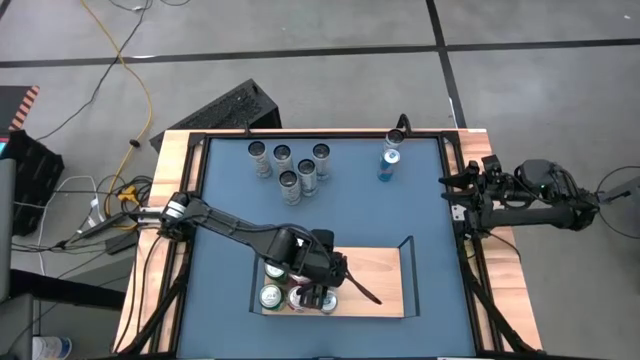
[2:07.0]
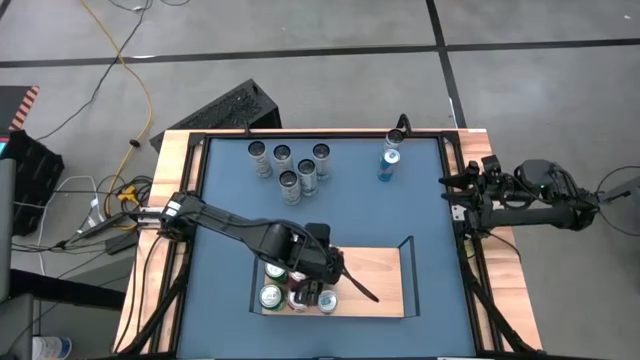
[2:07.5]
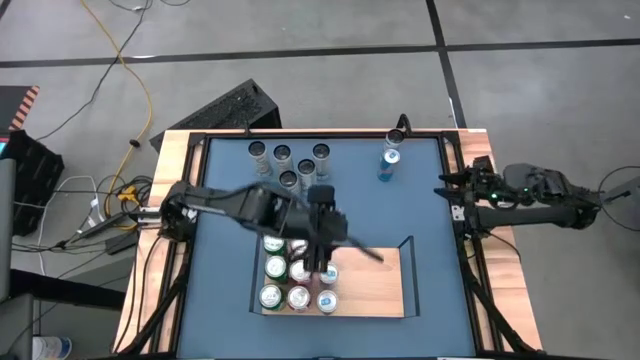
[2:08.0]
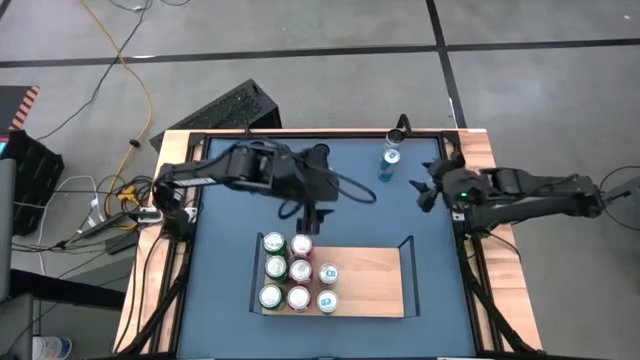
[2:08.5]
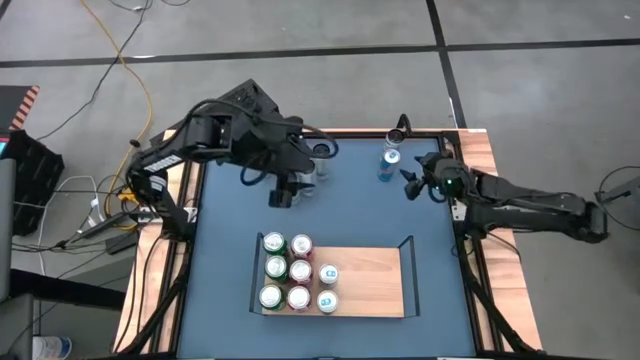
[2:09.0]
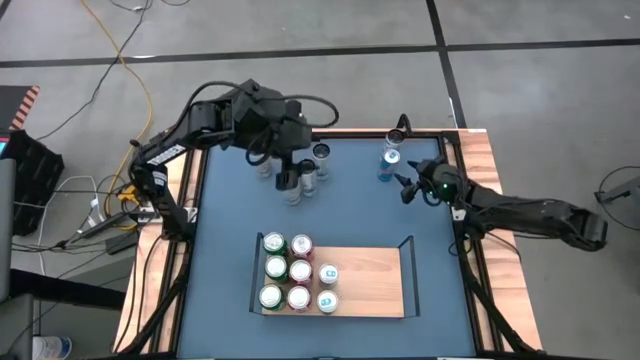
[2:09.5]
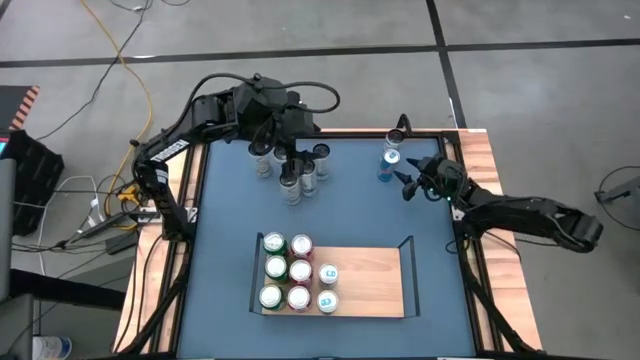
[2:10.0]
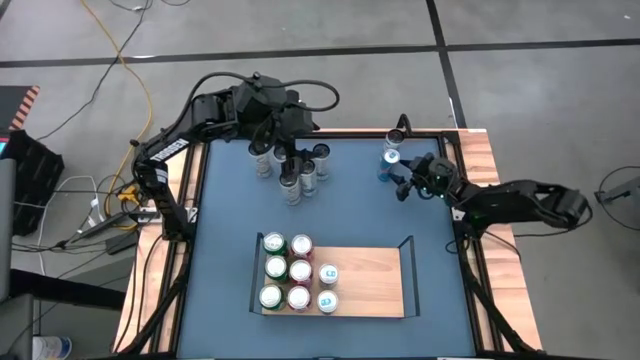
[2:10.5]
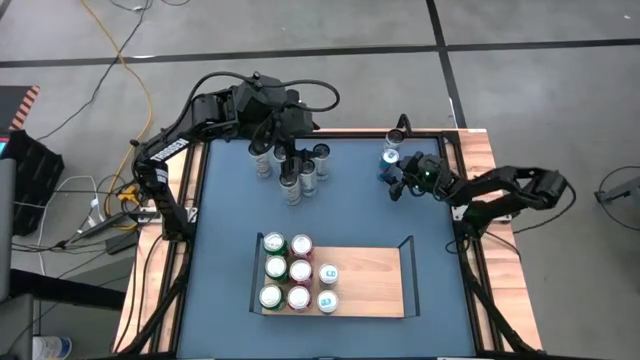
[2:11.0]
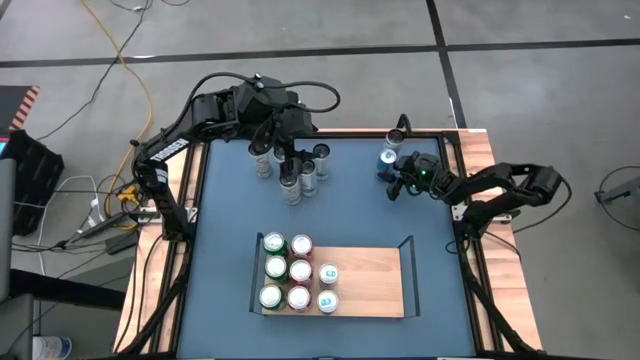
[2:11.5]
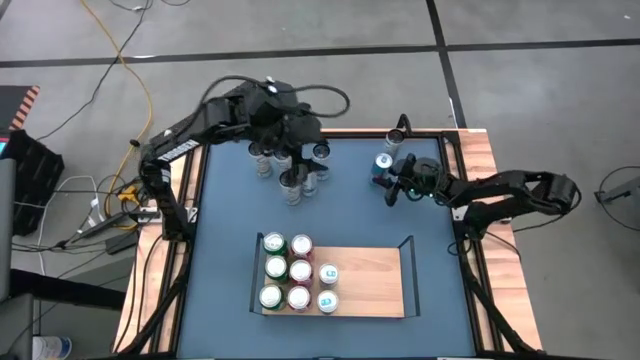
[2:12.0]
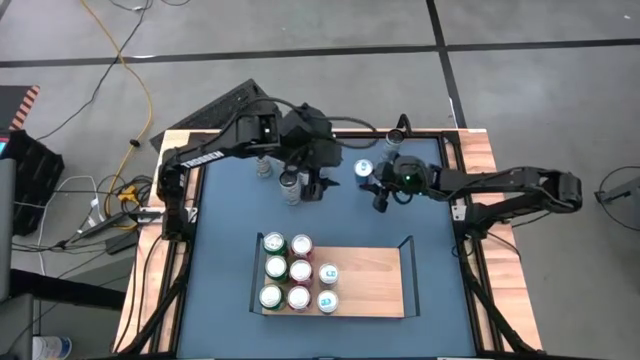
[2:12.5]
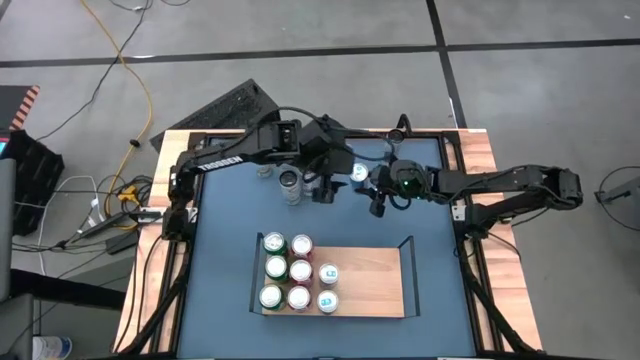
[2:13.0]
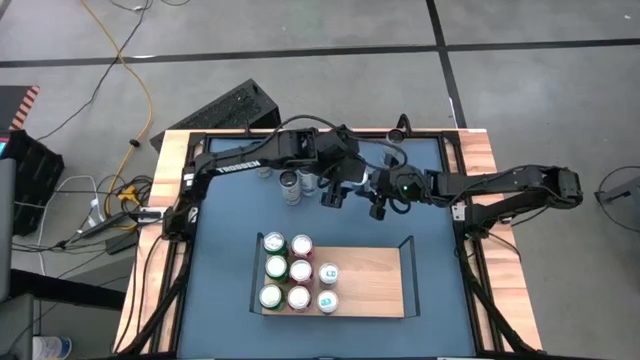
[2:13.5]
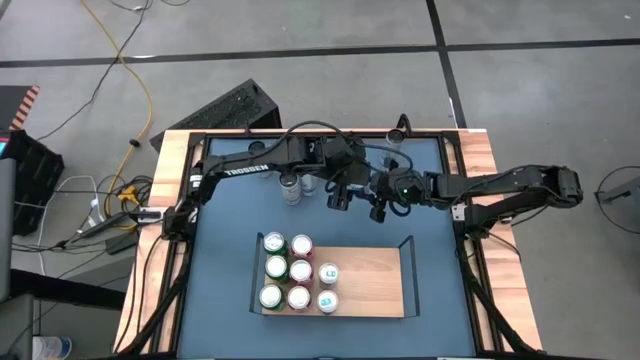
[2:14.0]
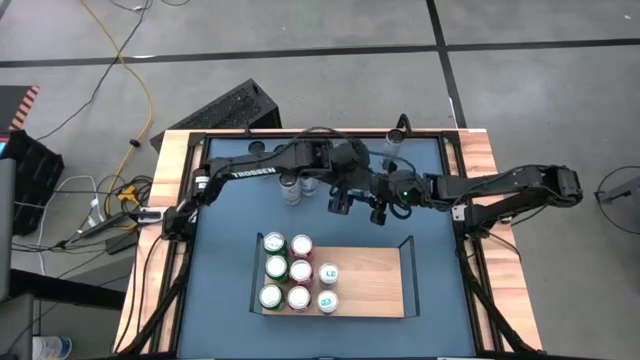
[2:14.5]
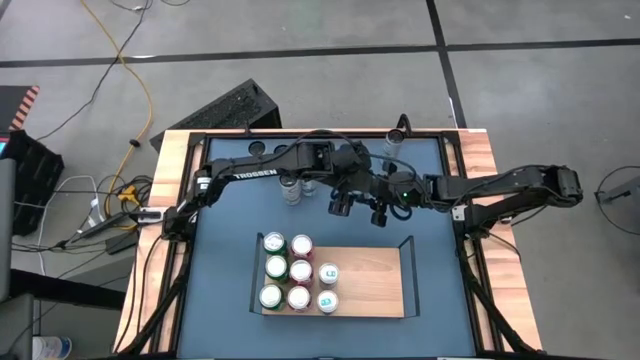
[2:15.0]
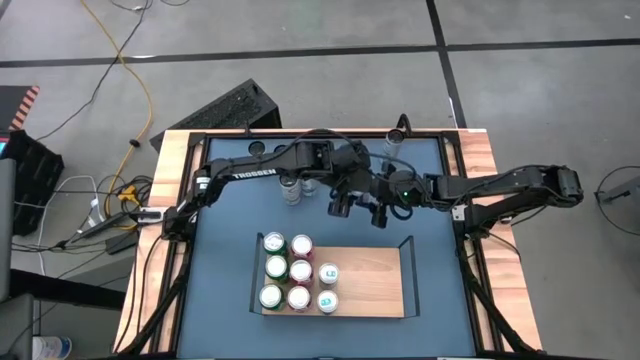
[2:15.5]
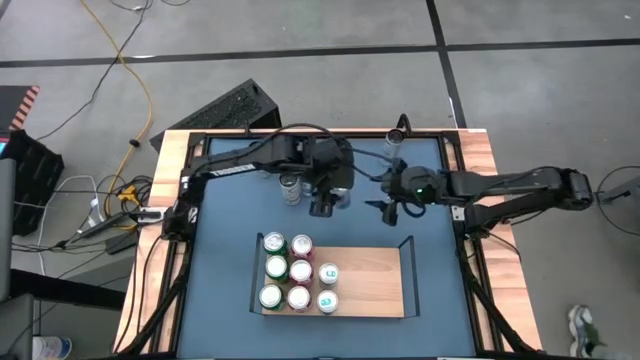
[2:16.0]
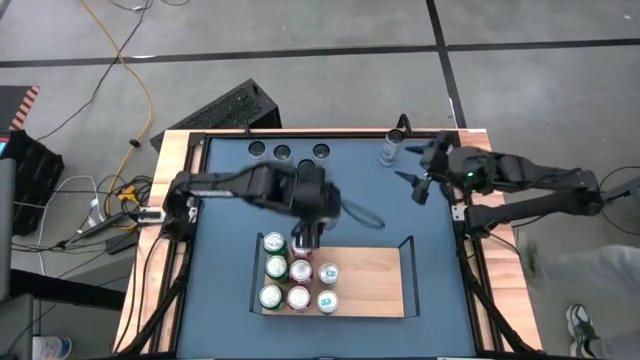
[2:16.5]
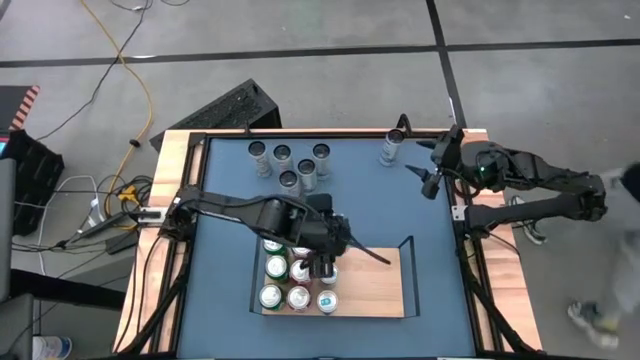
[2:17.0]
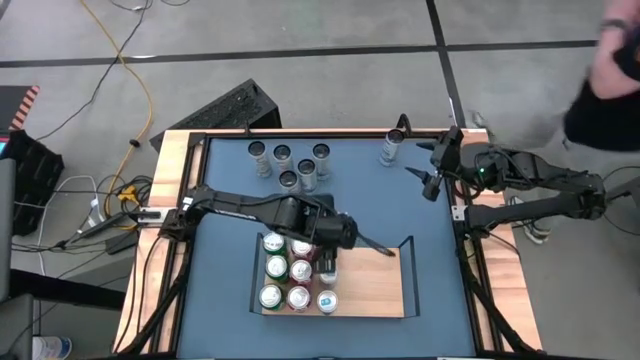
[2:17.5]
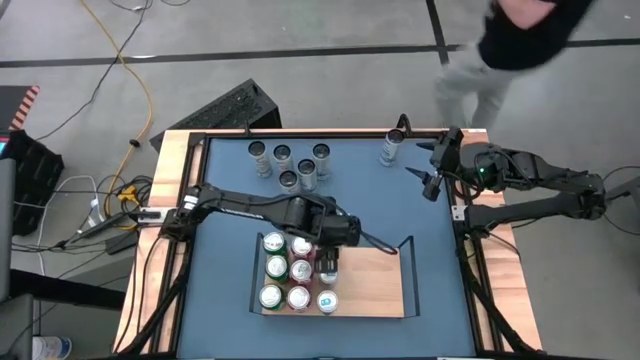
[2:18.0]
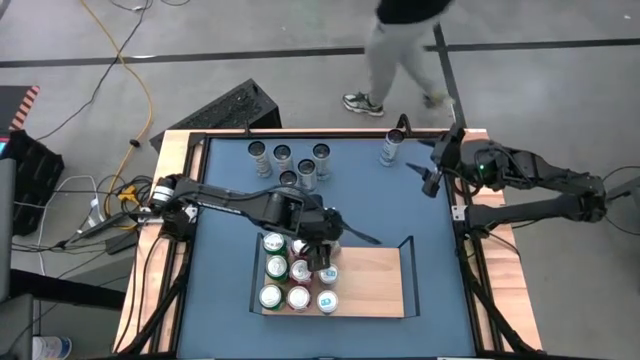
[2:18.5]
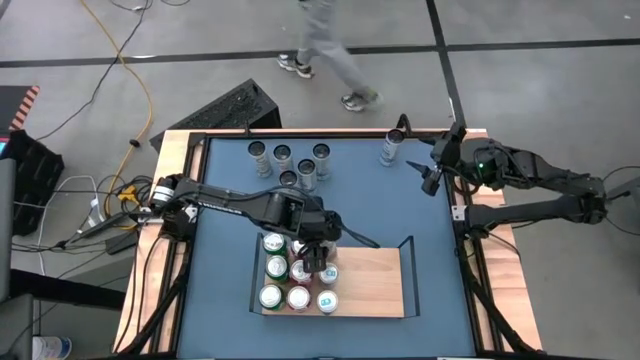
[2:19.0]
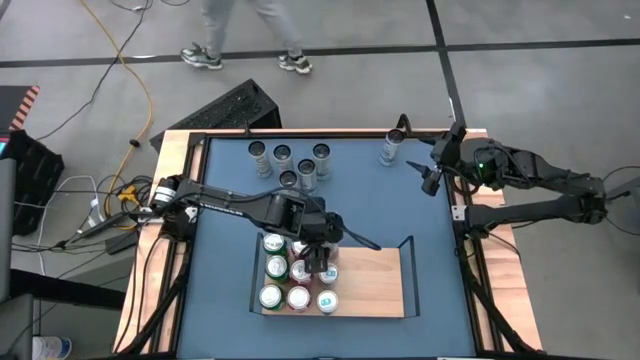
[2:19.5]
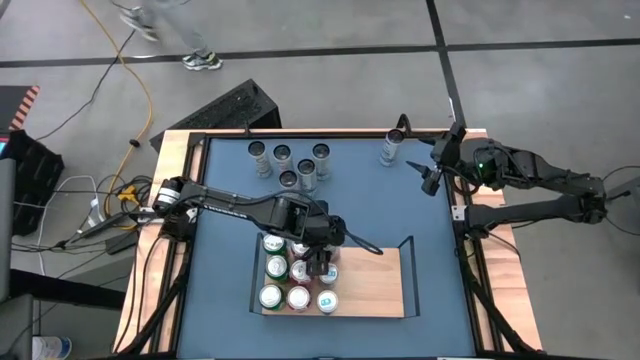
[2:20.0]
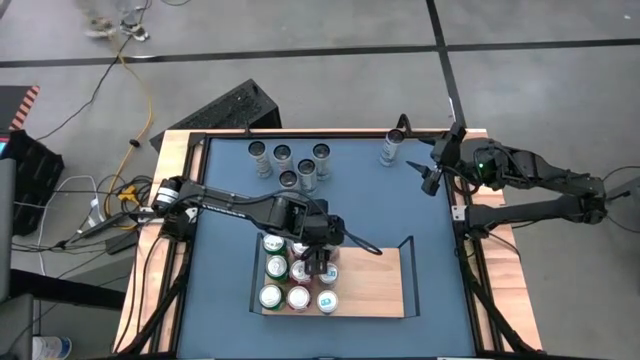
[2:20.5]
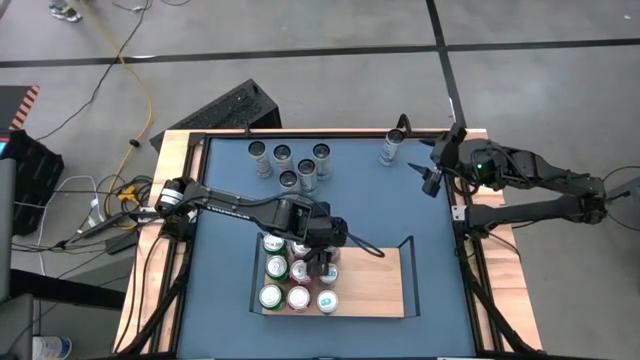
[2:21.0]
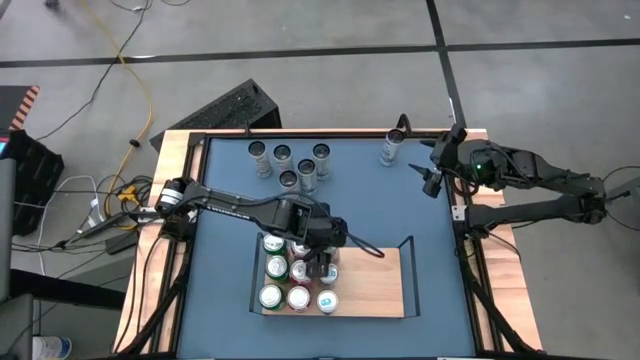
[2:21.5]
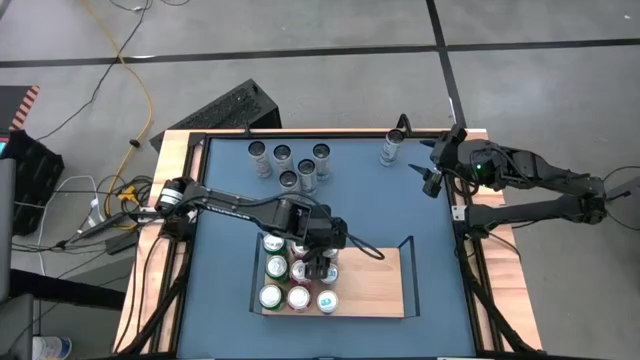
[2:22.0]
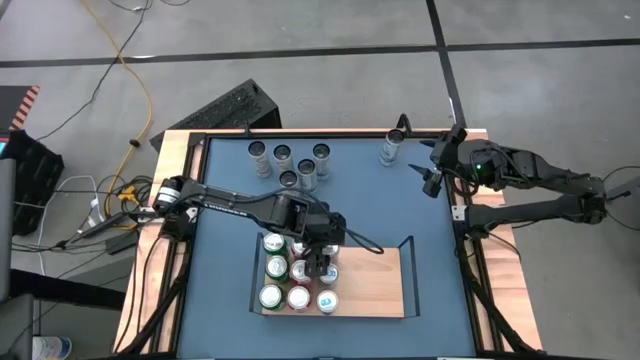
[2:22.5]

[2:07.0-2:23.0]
Task: Place canned beverage on shelf
Put the blue soda can on the shelf aligned with the other blue soda cans

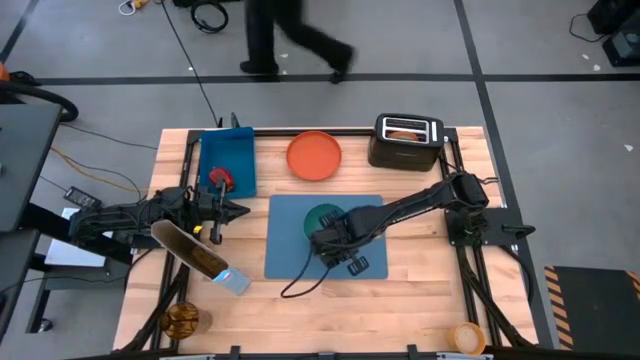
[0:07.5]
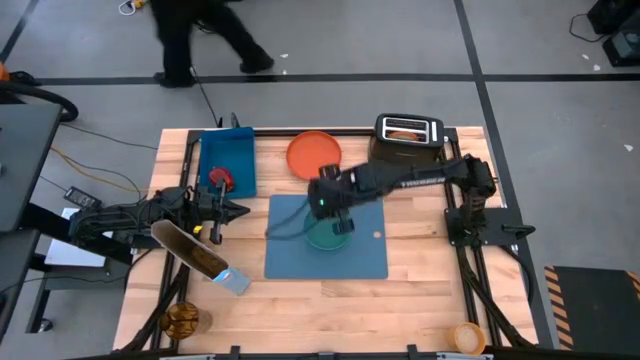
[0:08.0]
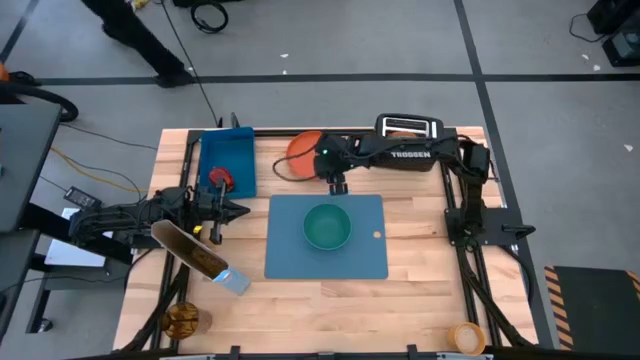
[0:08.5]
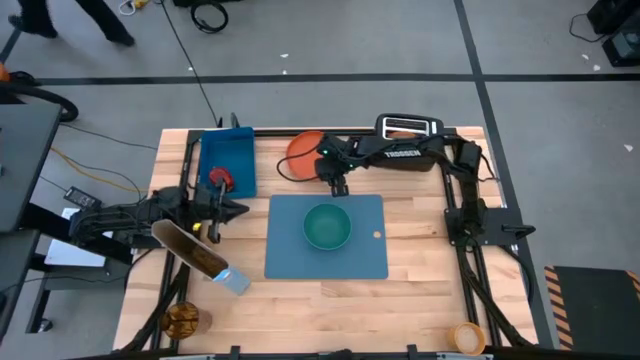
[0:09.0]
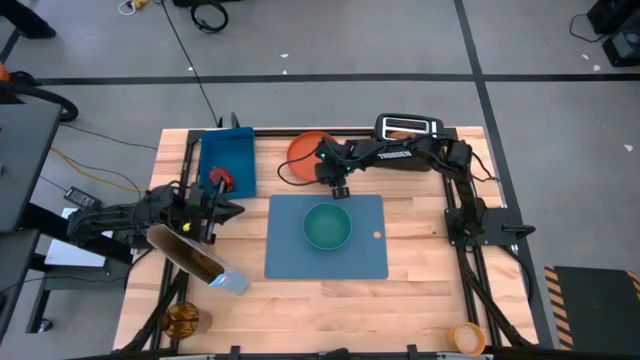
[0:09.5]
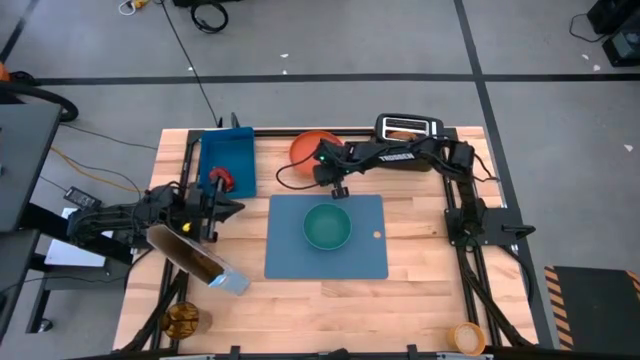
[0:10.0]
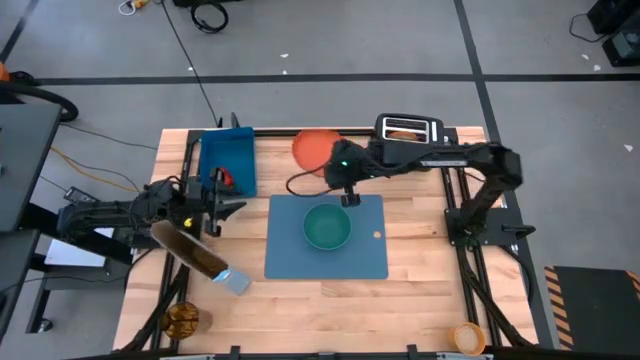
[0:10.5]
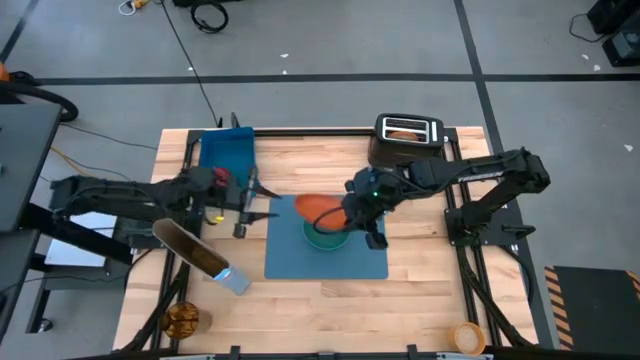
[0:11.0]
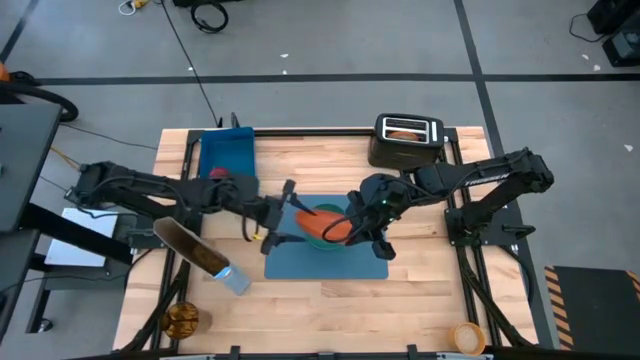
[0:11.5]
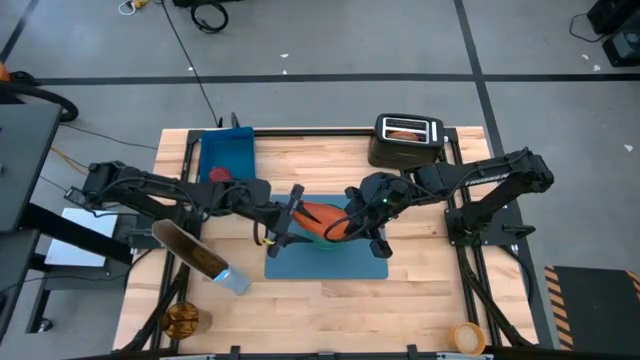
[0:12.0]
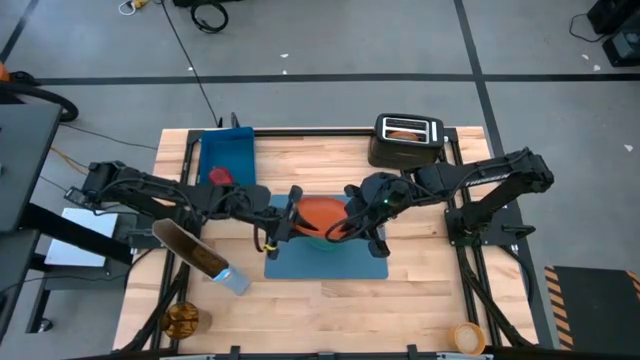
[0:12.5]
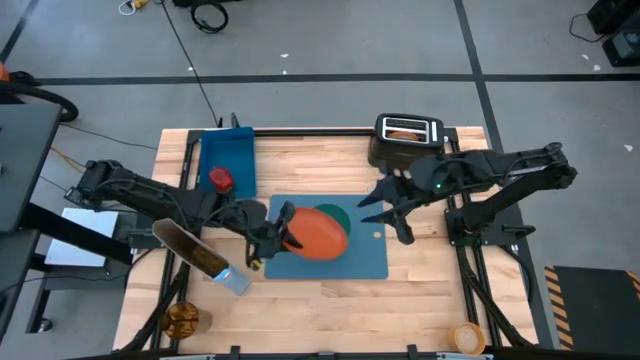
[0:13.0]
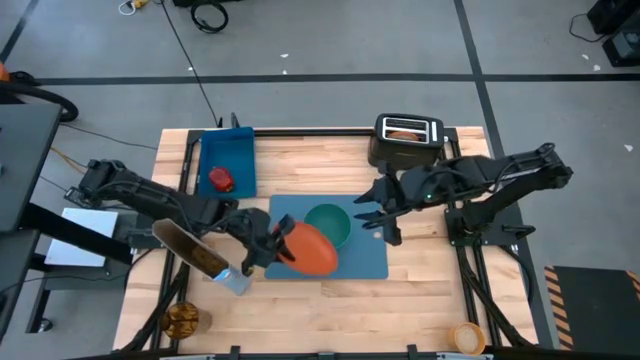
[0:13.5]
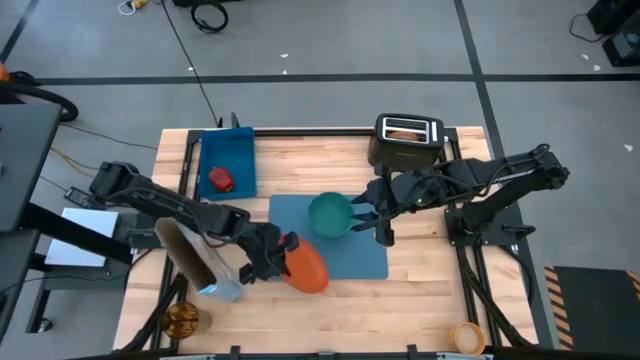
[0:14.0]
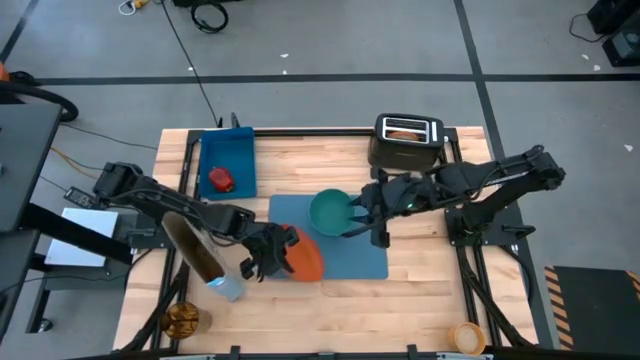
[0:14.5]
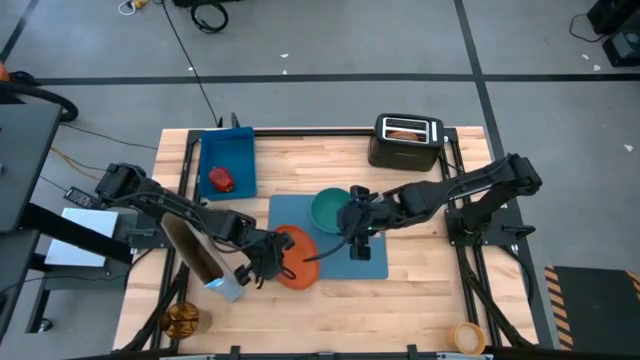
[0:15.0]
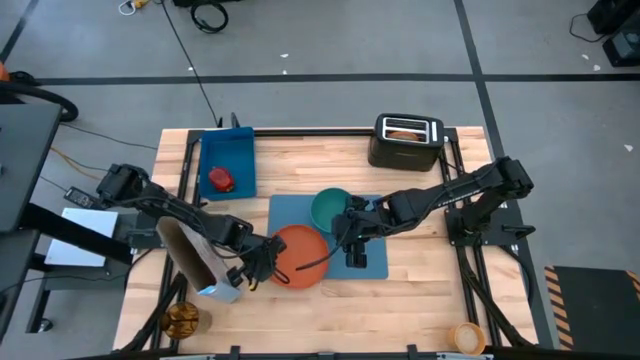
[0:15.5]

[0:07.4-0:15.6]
Task: Arrange a breakfast setting
Put the orange plate on the blue table mat to the bottom left of the green bowl
